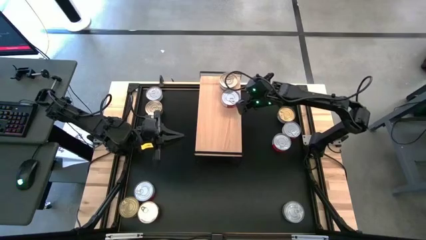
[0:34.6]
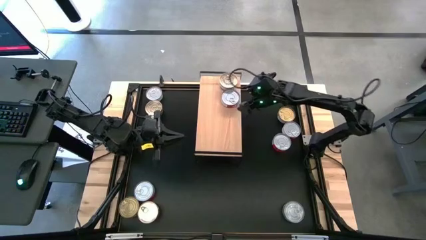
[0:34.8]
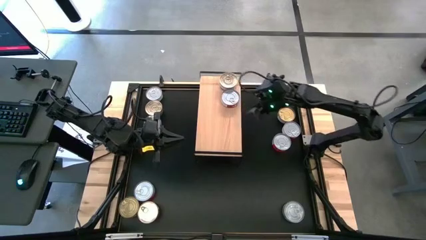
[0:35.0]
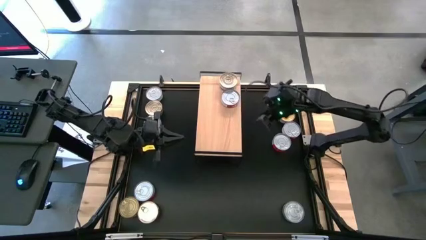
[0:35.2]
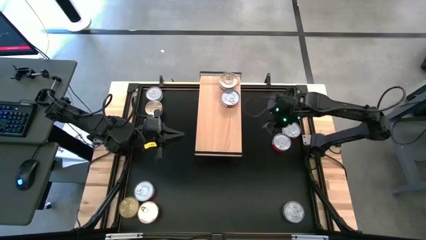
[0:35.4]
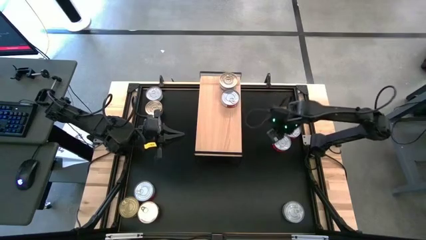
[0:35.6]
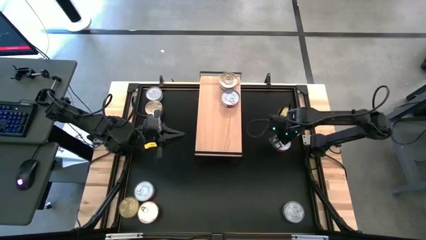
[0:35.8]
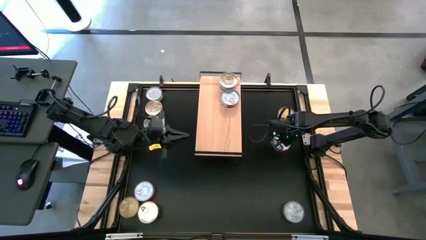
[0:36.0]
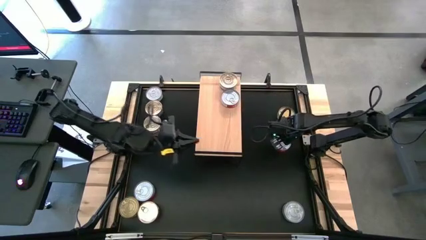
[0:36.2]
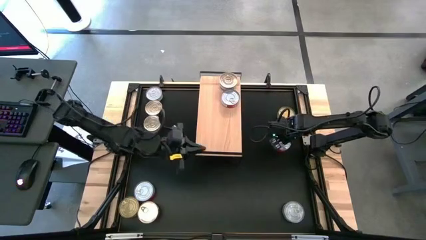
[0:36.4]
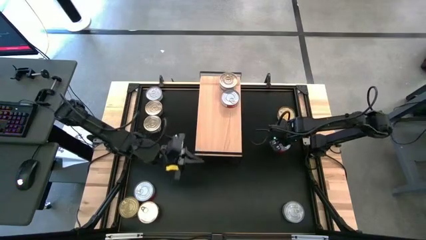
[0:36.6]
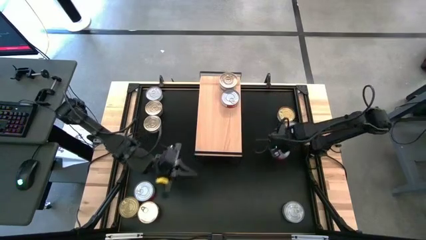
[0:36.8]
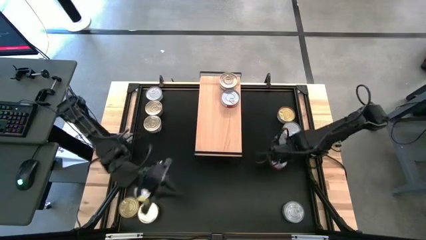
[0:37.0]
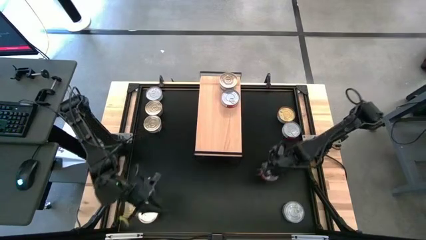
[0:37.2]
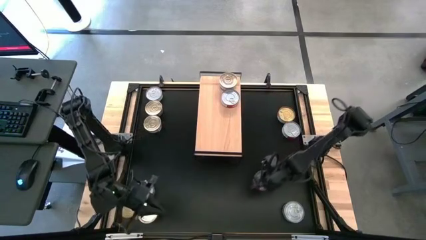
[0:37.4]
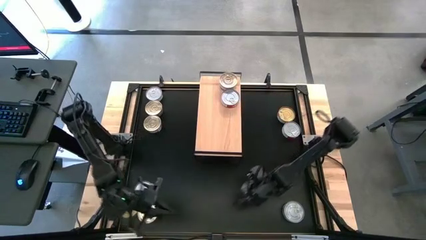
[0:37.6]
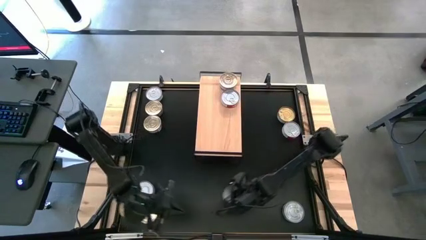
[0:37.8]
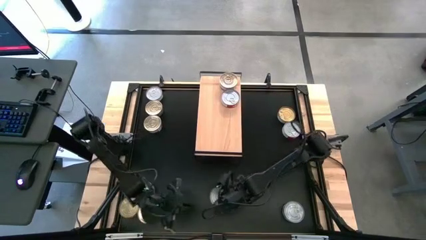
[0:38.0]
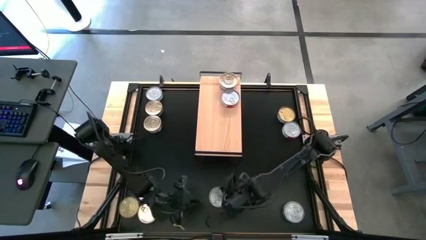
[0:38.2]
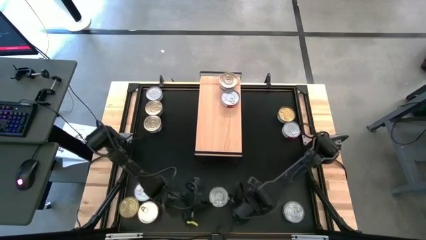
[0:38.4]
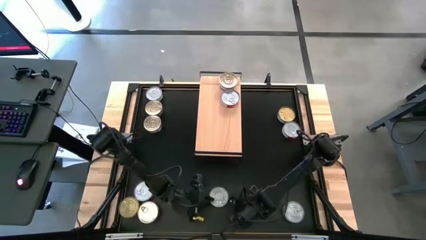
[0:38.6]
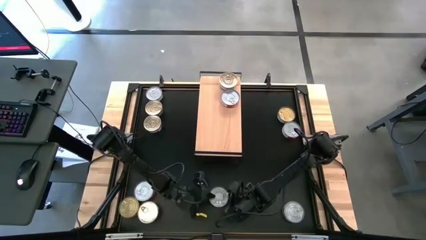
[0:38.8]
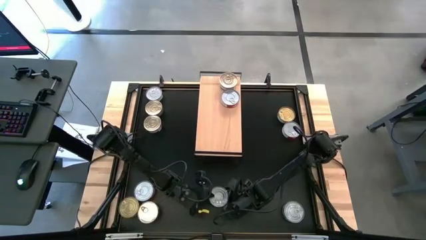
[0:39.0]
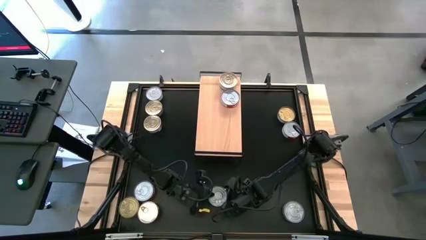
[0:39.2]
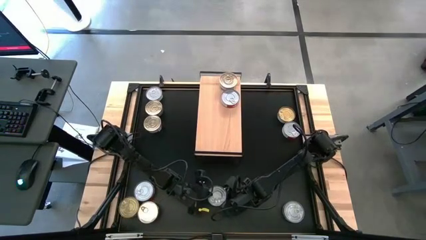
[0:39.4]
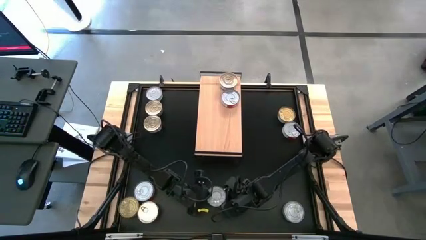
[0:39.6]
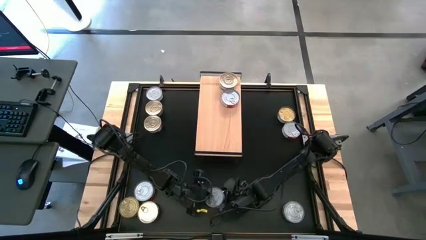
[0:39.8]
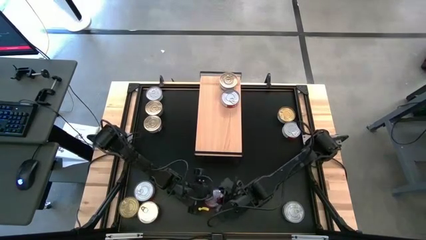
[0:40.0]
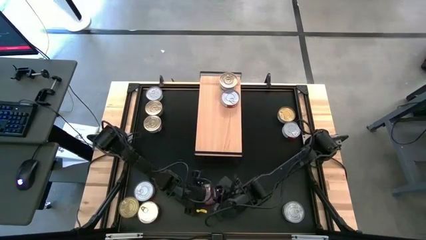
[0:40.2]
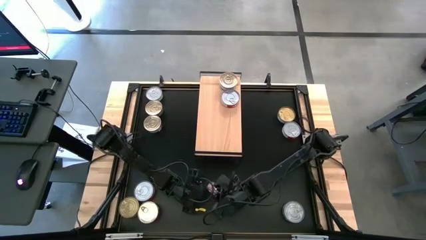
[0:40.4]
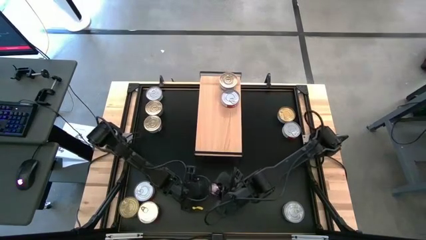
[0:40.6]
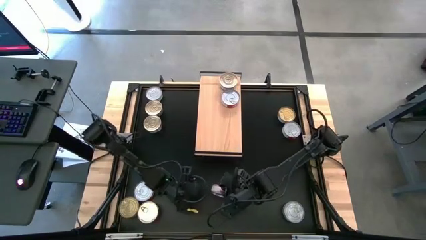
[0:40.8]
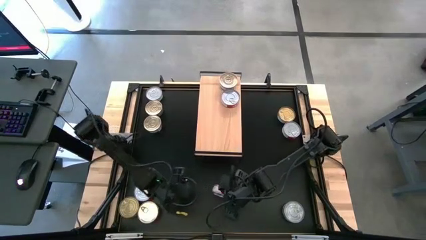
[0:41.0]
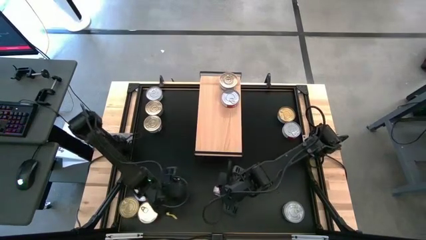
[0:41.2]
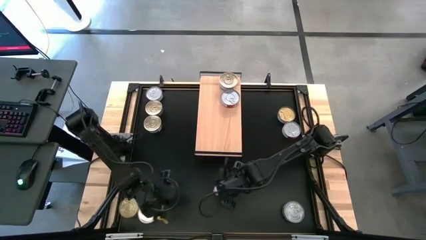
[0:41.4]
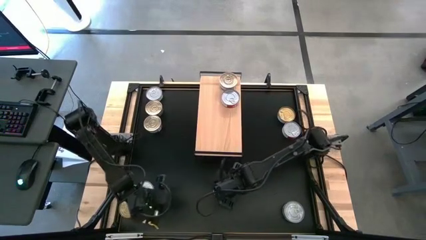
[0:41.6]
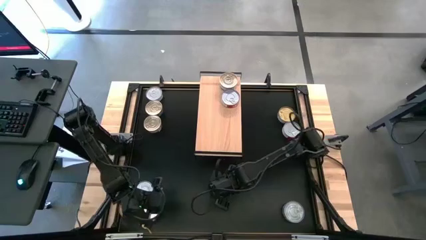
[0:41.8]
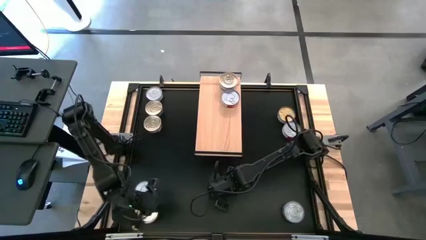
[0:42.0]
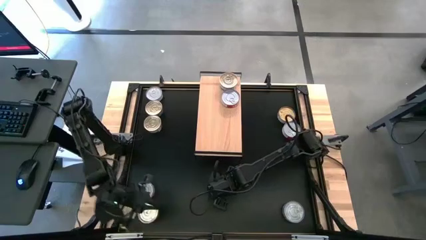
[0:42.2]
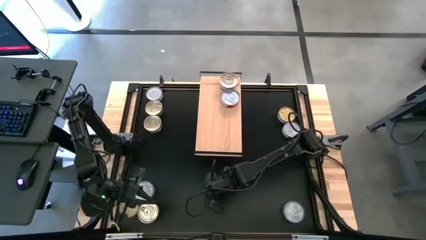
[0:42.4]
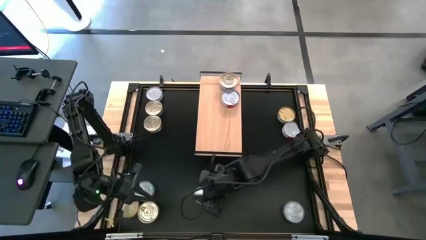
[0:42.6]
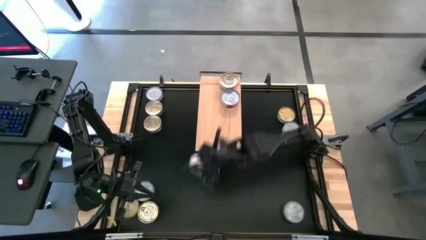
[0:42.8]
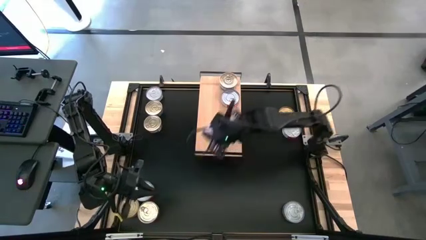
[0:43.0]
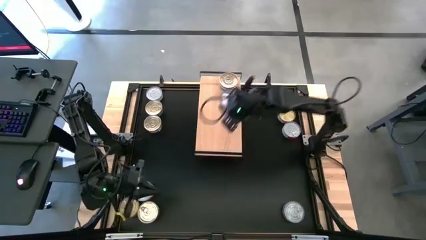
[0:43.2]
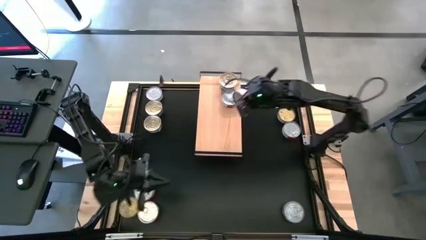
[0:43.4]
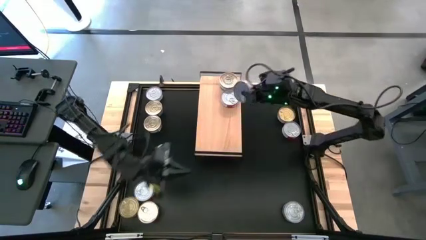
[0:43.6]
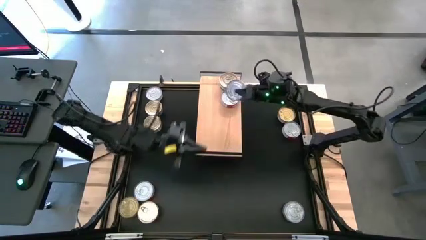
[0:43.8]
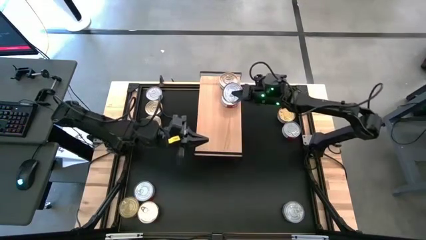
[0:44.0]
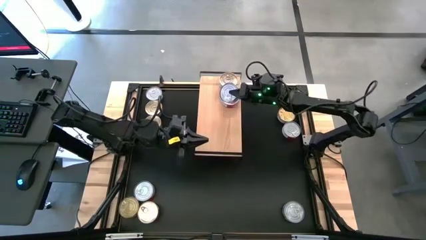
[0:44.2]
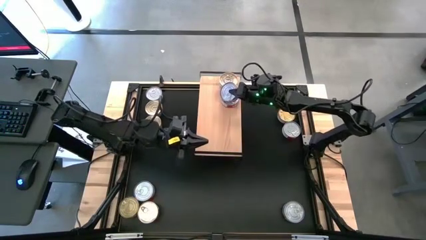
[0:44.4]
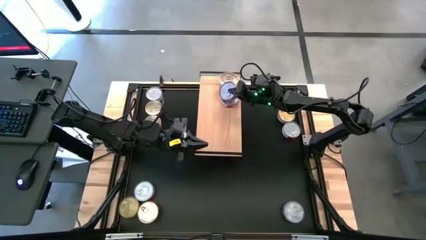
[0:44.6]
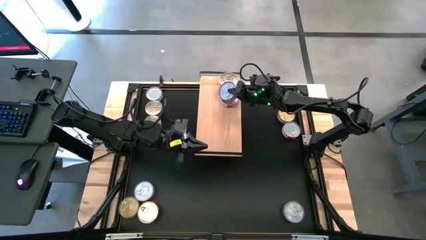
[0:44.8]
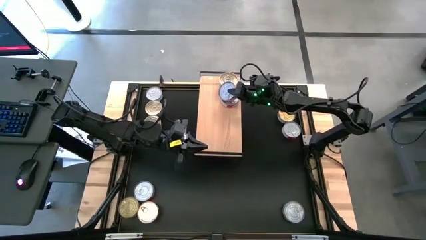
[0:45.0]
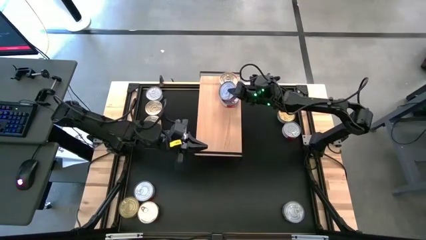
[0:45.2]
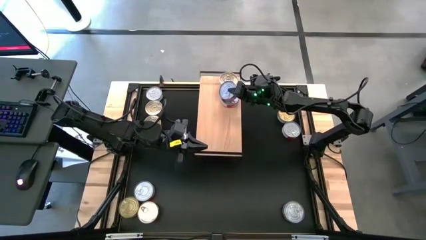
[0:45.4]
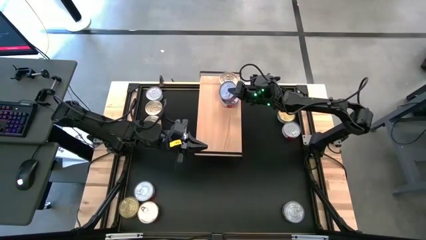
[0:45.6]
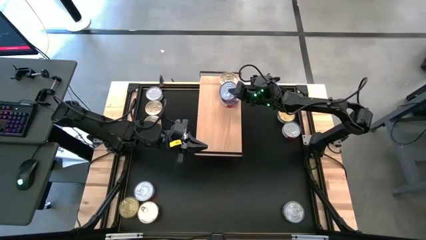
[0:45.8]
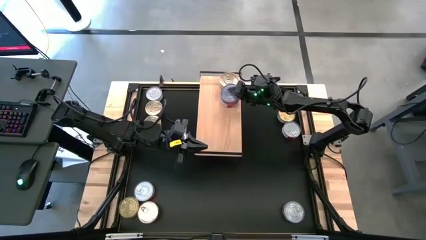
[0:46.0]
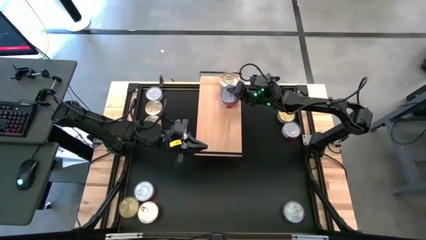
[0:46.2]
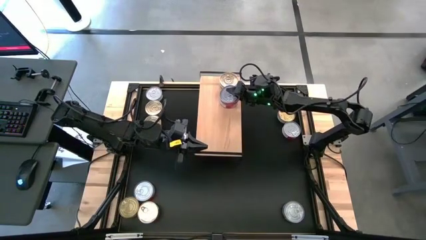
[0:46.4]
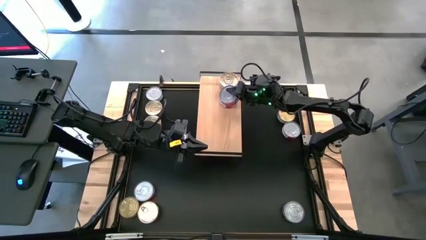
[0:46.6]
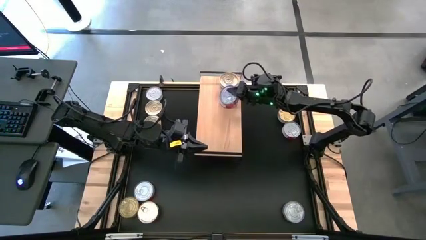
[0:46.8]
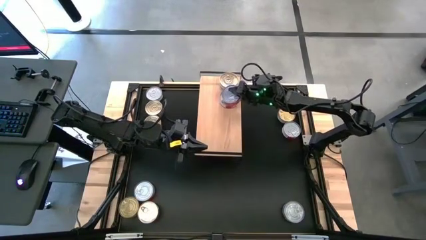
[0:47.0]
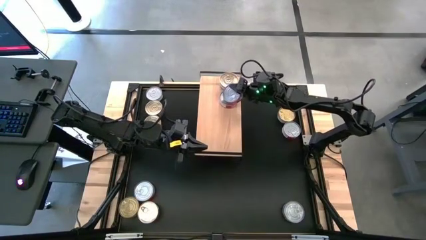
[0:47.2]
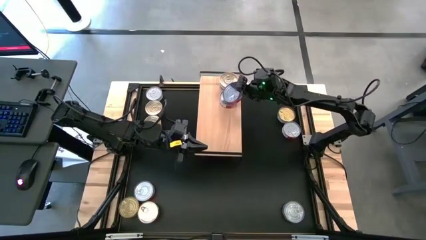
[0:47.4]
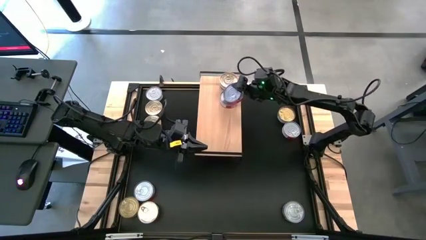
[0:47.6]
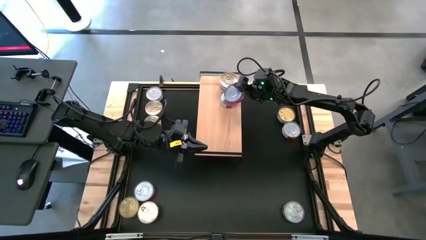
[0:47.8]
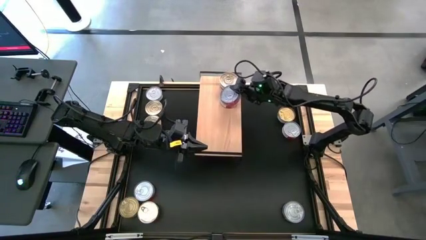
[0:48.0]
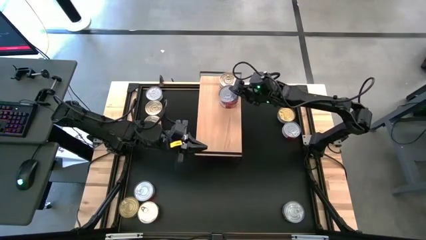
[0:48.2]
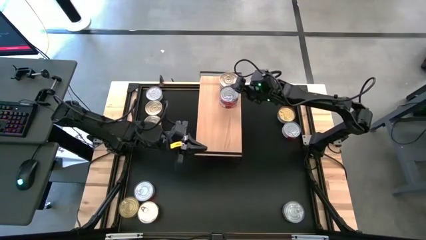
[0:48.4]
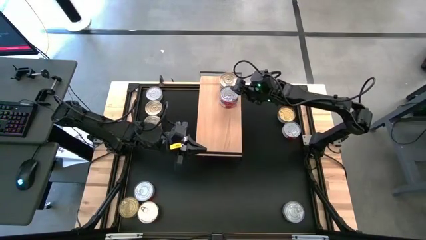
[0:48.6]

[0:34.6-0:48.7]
Task: Stack canned seafood by type on shelf
Stack the red tuna can on top of the red tuna can on the shelf

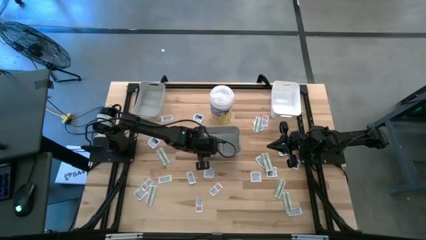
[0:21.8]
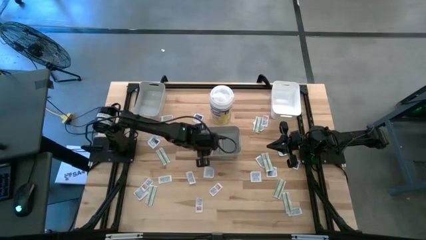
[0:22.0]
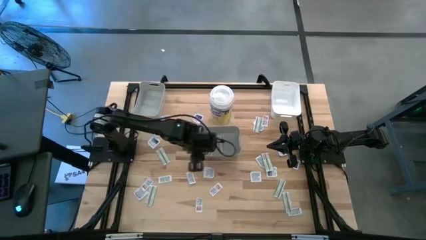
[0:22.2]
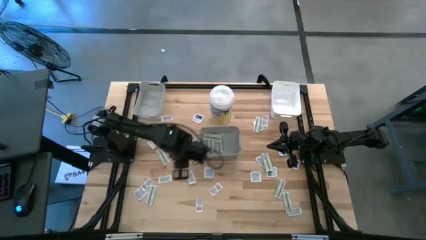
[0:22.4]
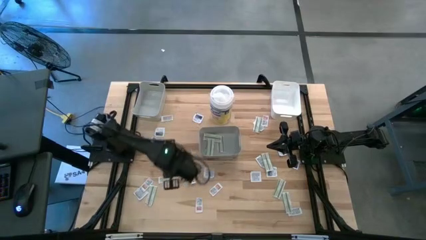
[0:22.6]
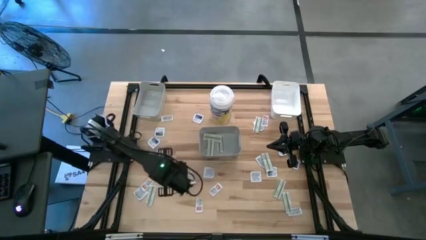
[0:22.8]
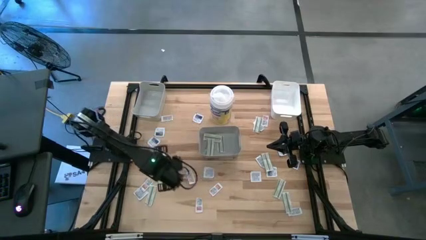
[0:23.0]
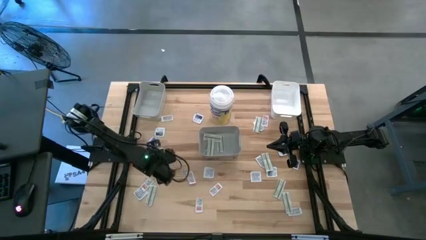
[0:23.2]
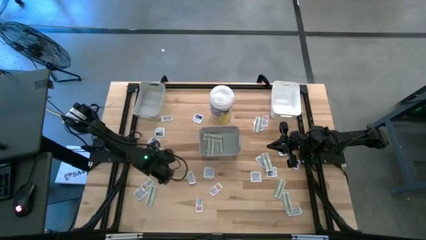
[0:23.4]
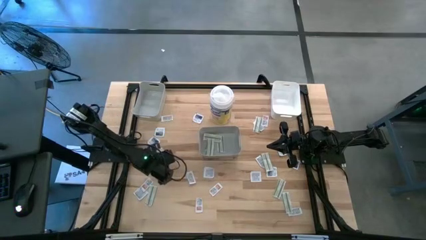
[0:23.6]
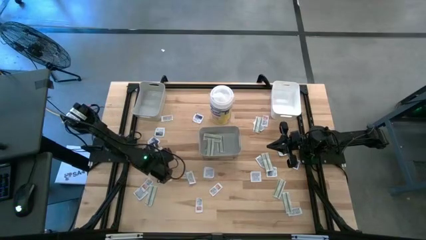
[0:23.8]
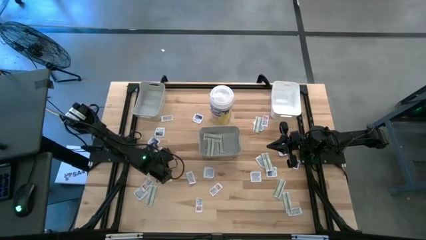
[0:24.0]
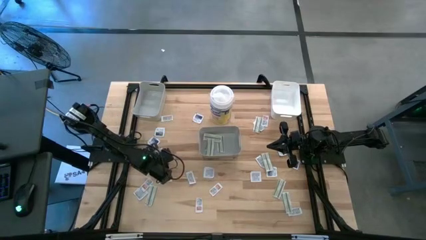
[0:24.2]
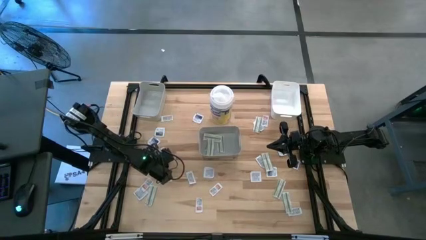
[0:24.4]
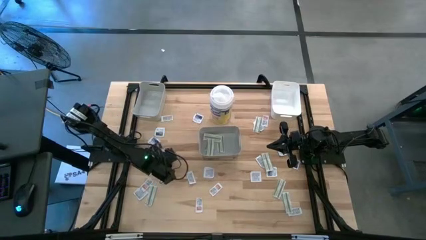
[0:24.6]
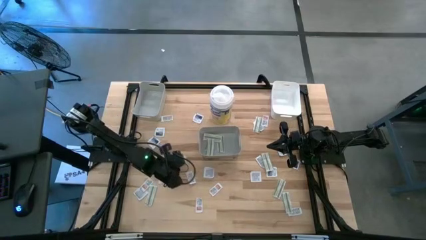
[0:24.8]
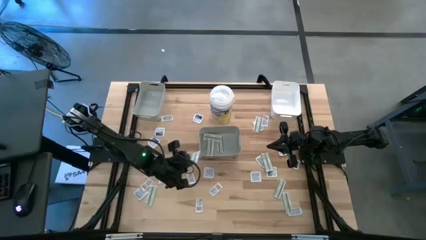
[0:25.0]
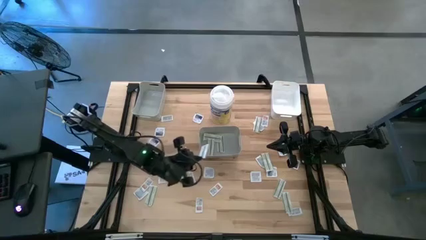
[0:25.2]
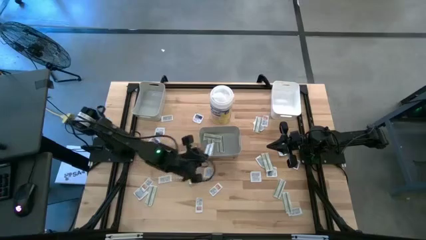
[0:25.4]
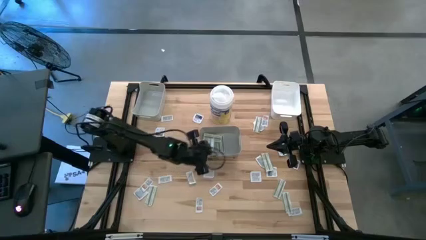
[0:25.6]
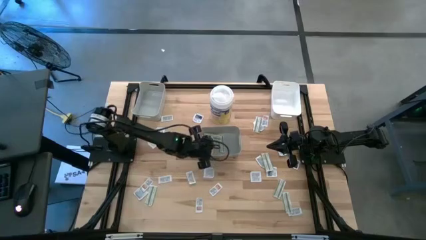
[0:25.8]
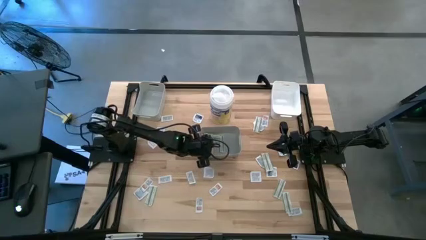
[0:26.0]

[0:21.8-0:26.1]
Task: Pick & Place First Aid Supplies
Put the bandage into the bottom gray bin
